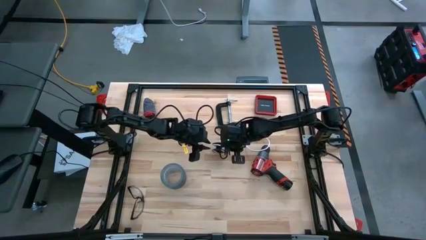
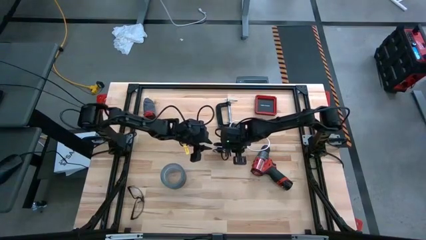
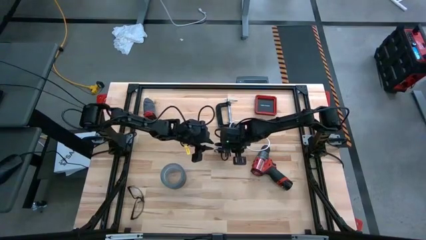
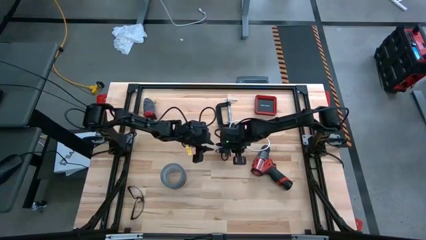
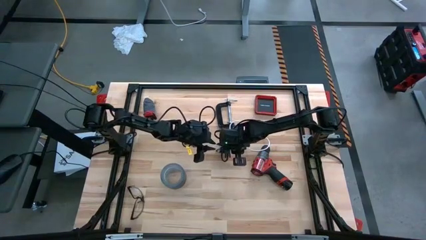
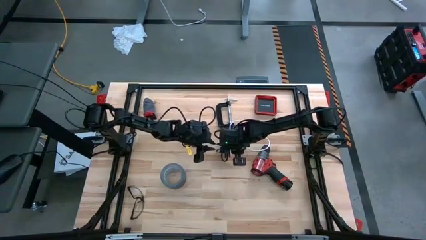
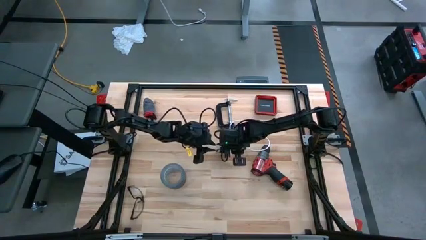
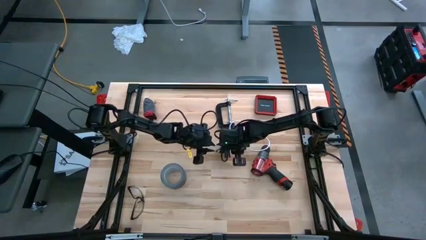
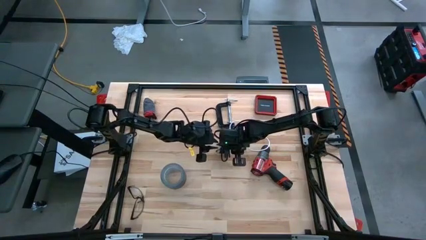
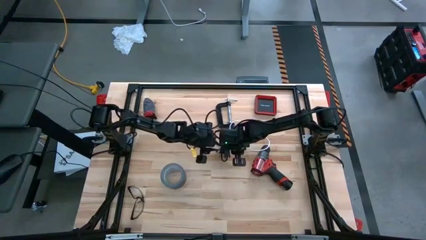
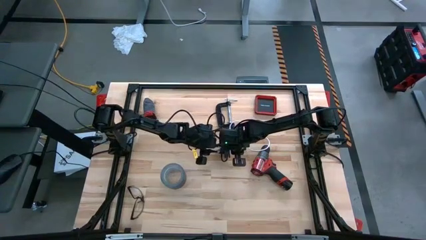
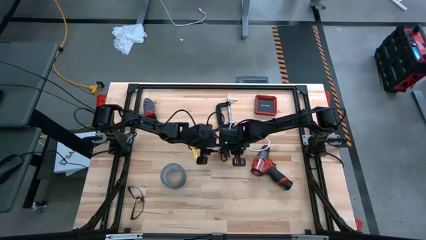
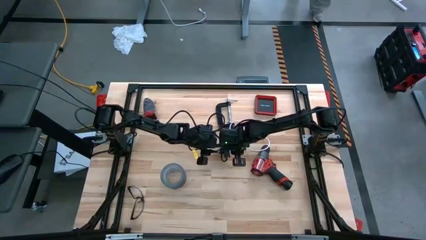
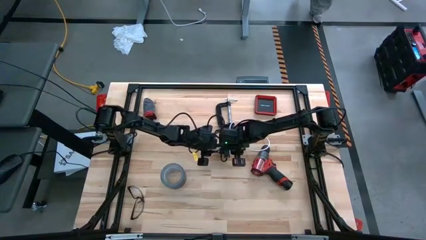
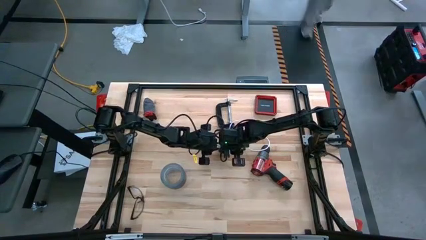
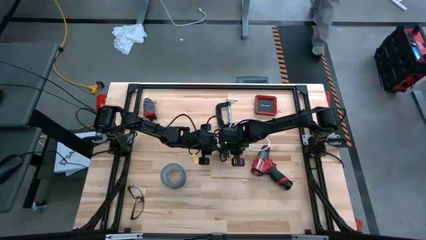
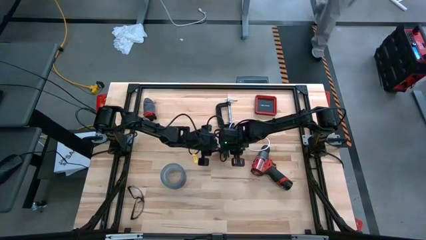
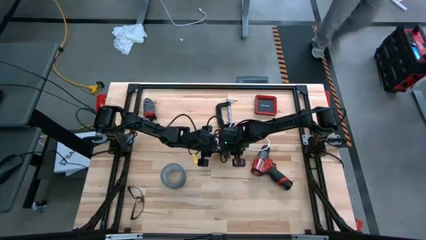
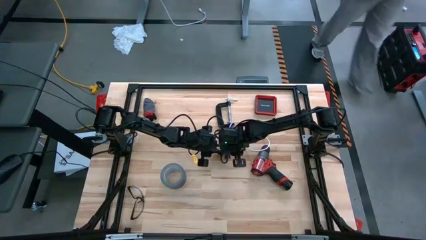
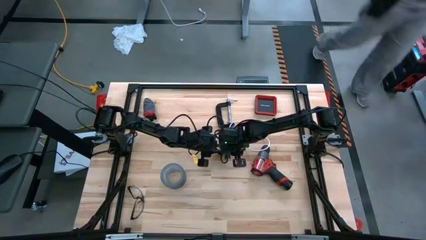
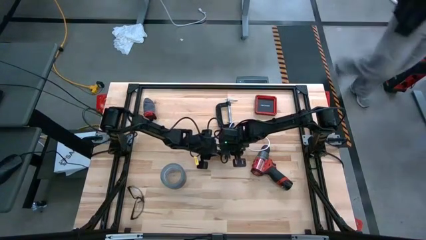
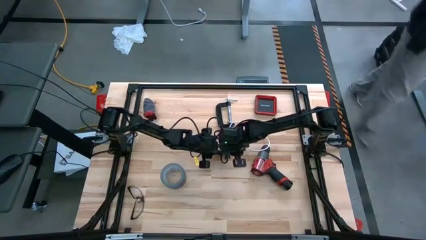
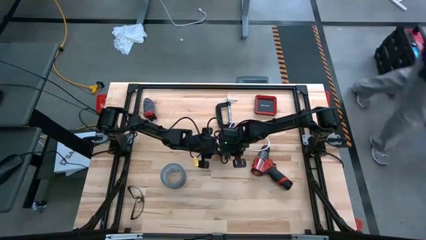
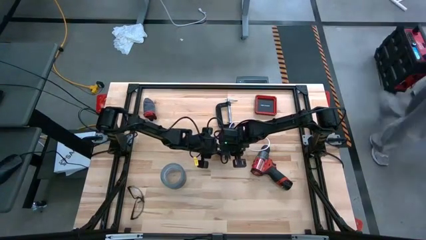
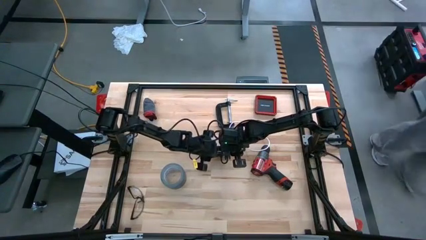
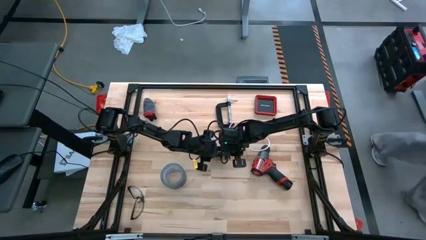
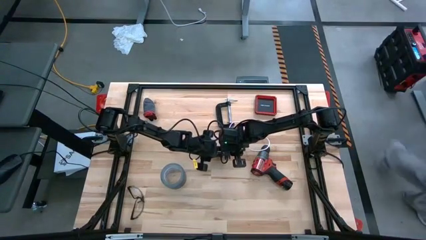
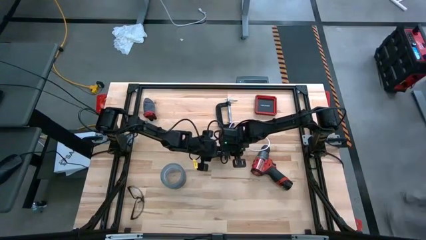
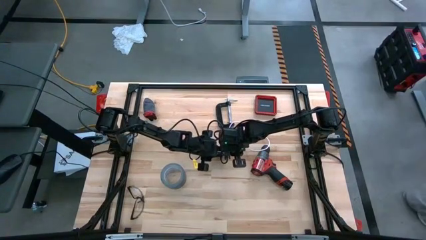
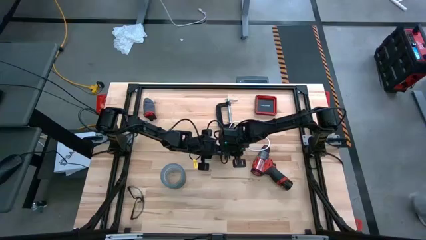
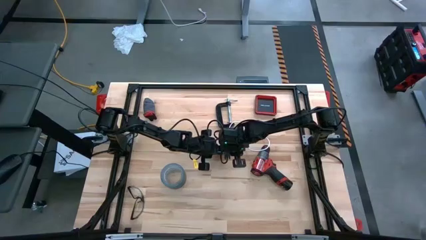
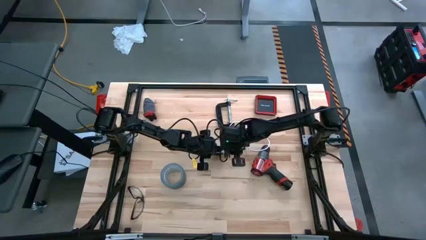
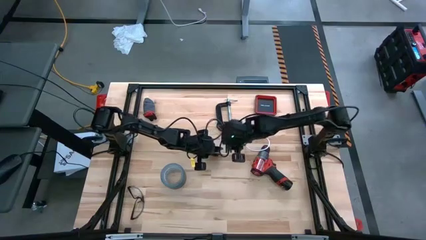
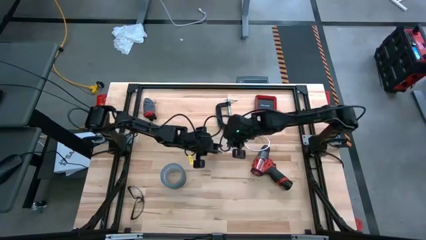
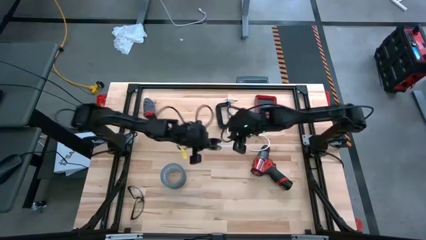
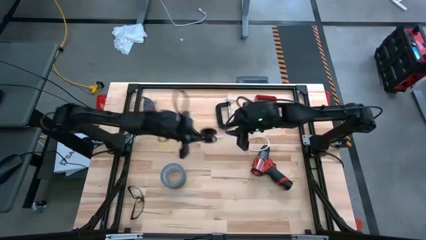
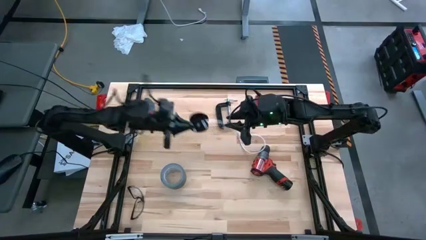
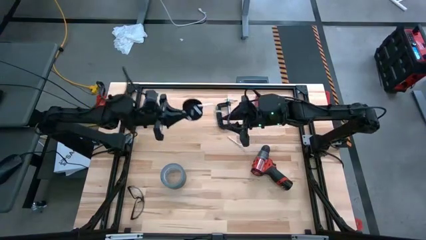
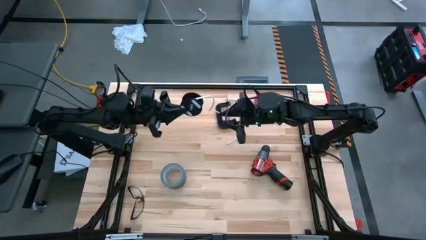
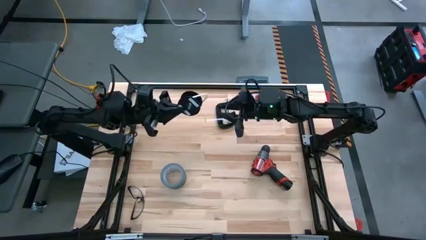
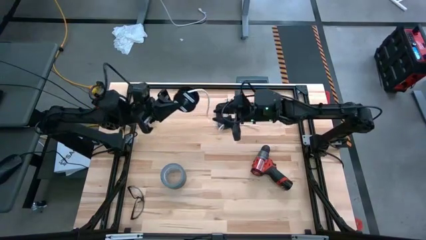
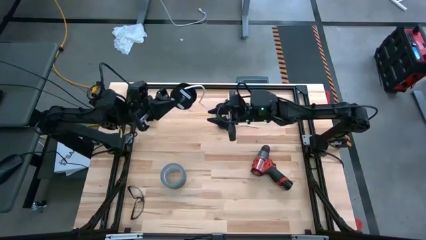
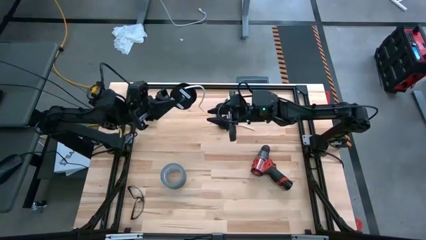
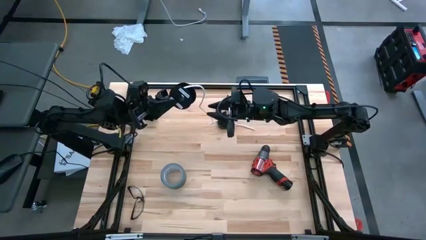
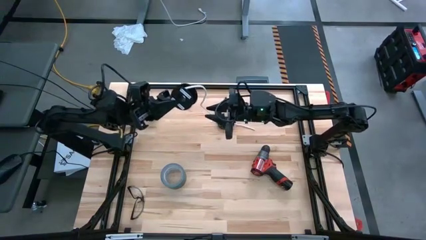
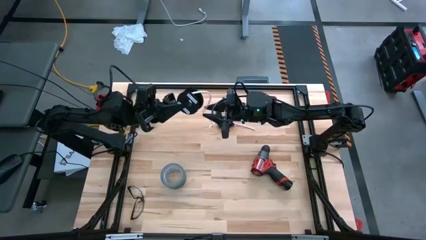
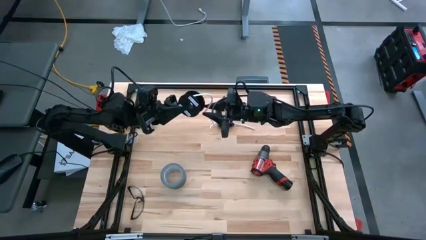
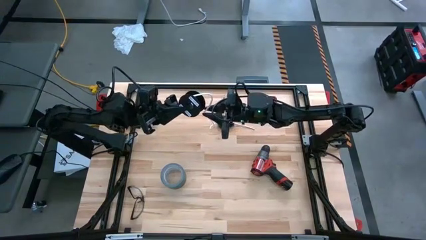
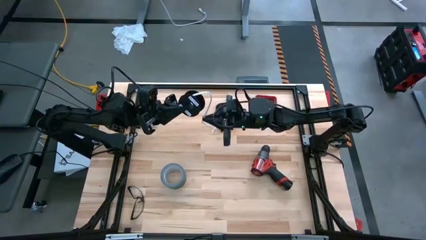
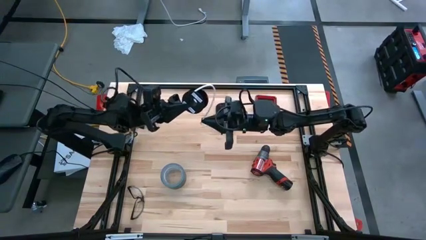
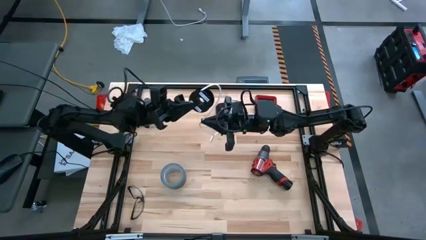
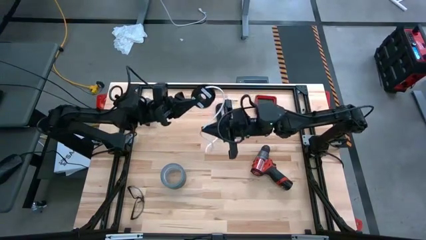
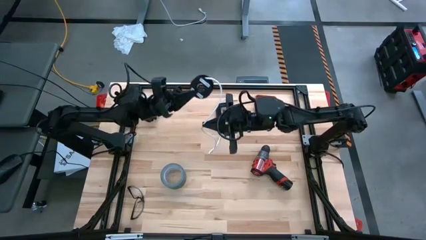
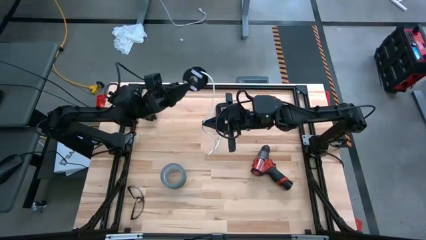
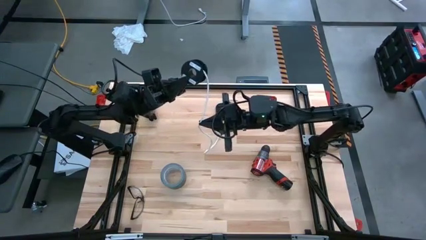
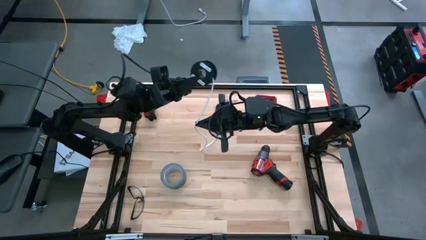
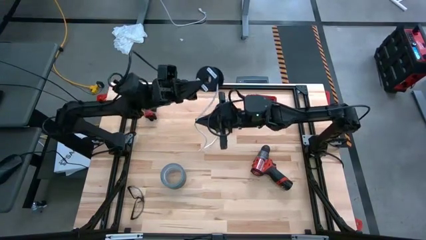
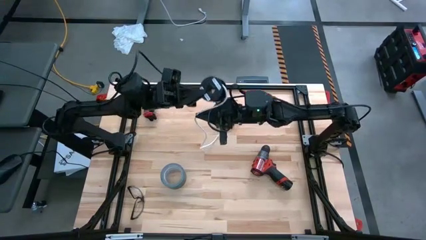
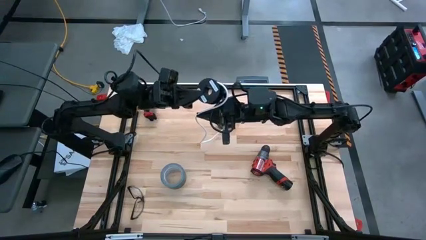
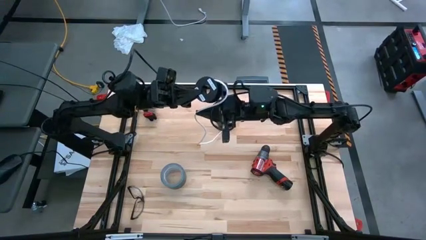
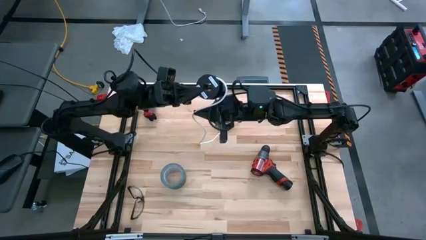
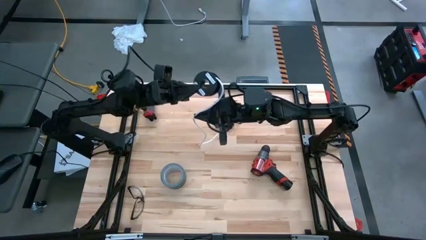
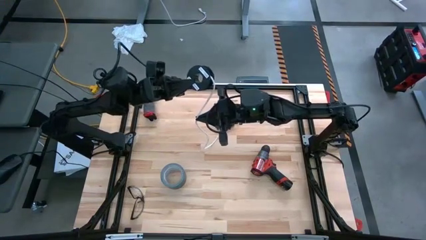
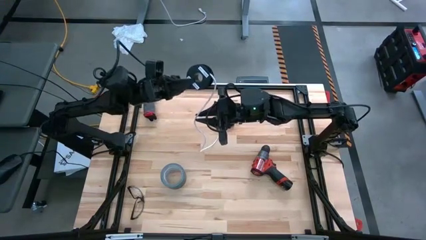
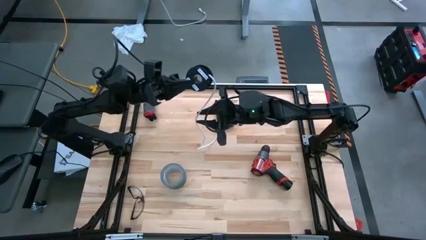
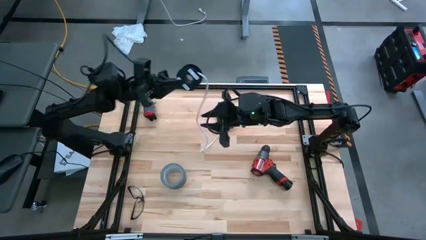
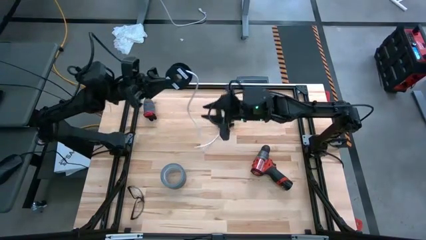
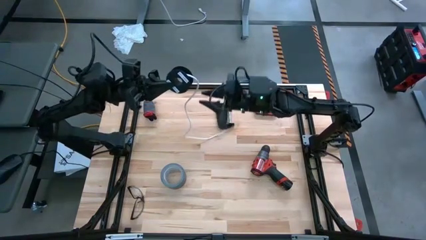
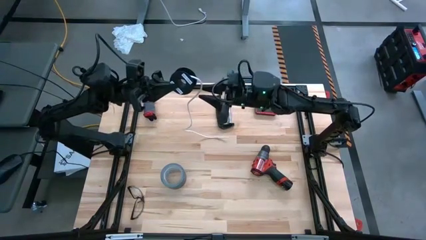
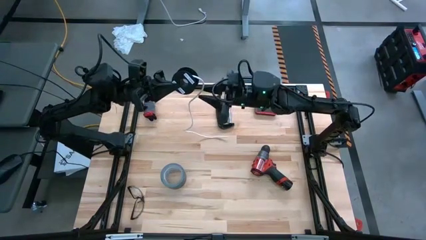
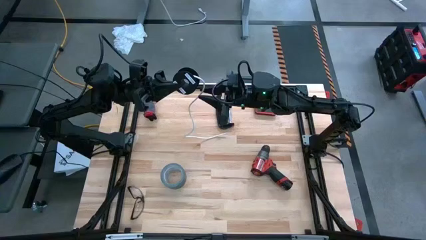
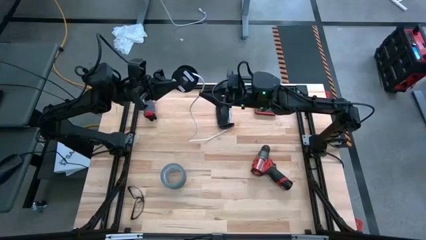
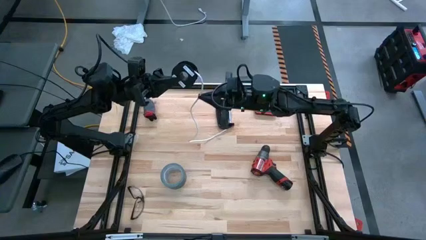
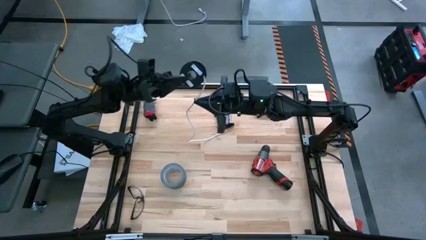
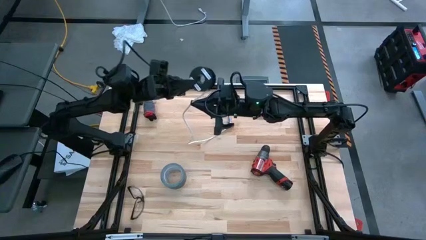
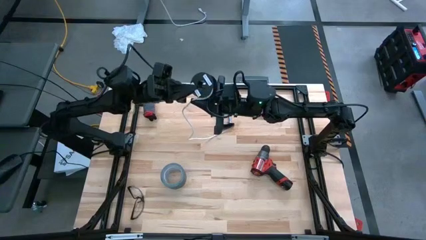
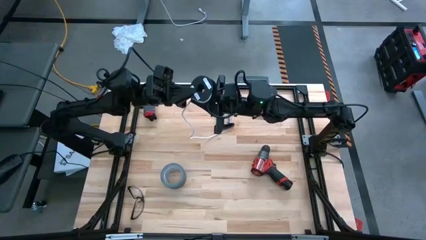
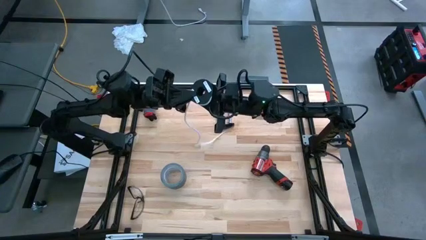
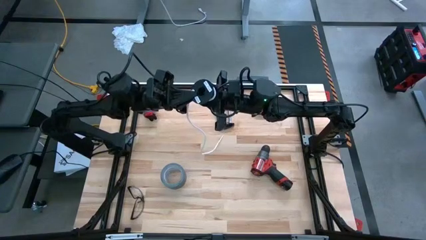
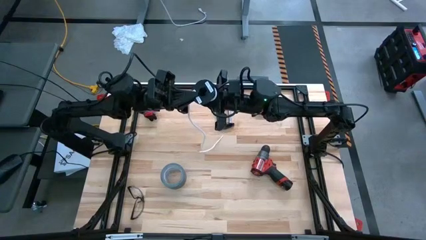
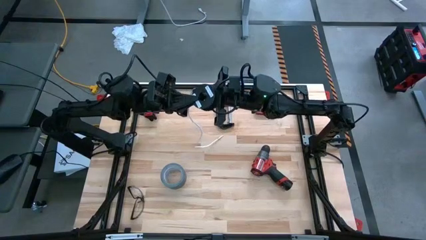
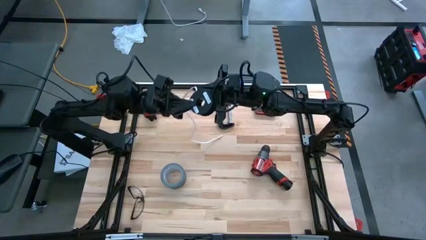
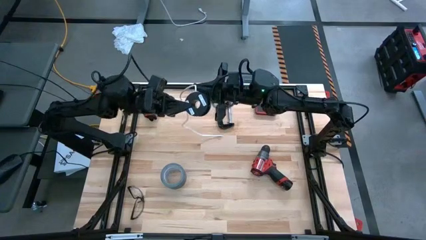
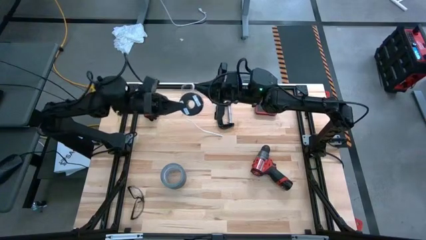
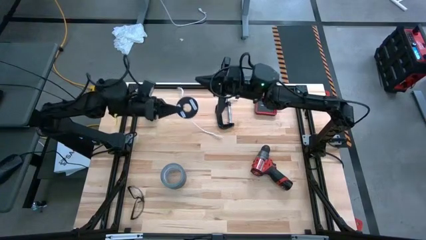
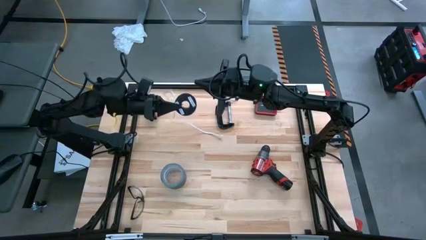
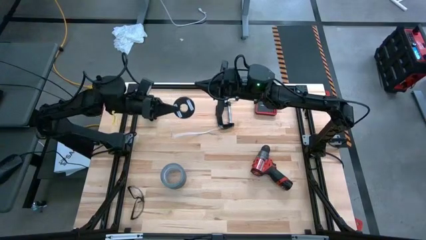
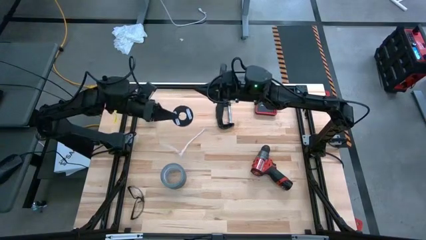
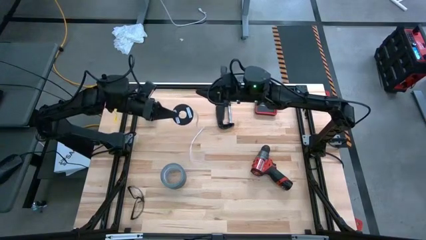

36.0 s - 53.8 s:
Task: Coil cords
Coil the white wire onto the black spool
